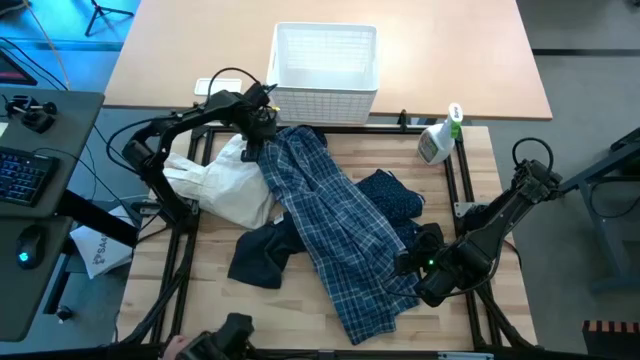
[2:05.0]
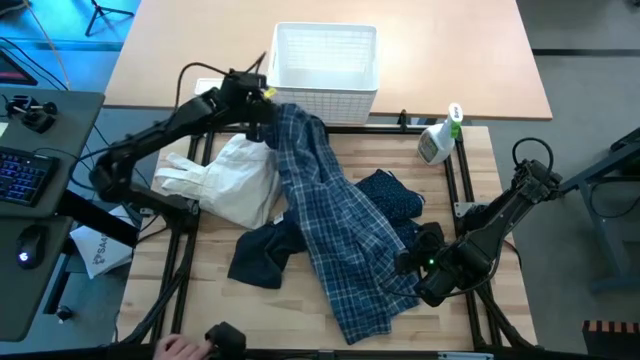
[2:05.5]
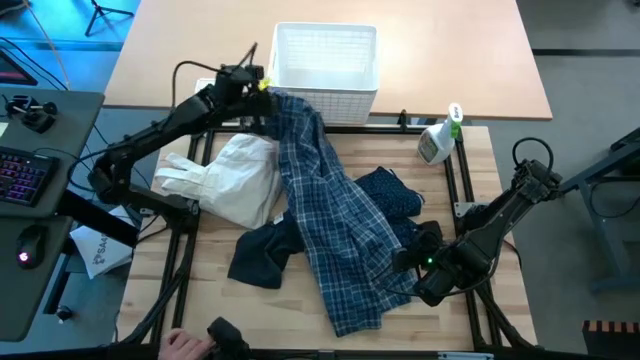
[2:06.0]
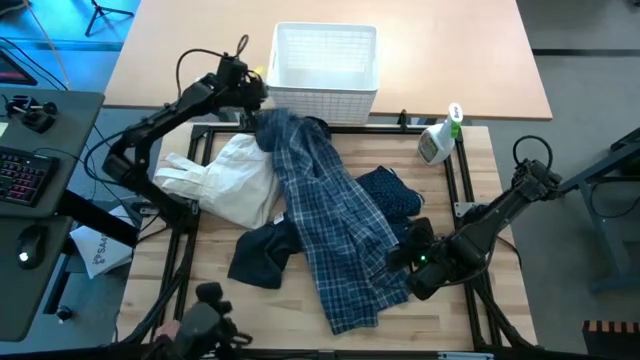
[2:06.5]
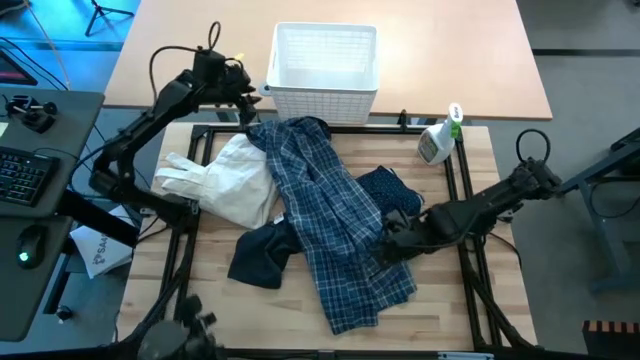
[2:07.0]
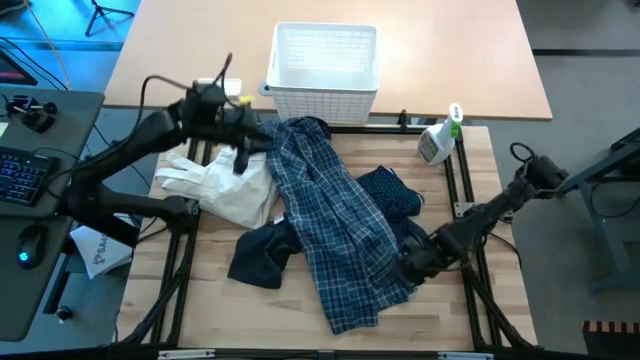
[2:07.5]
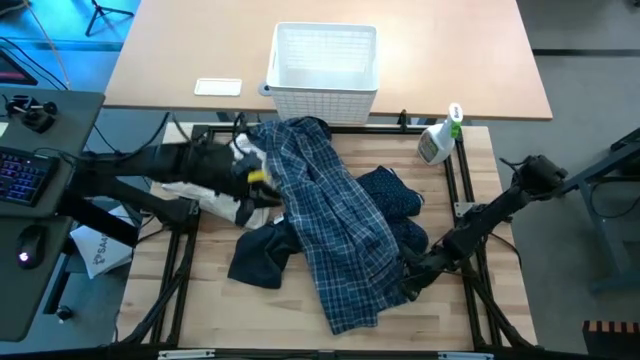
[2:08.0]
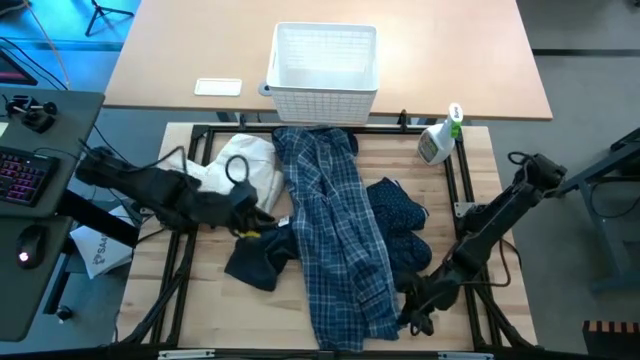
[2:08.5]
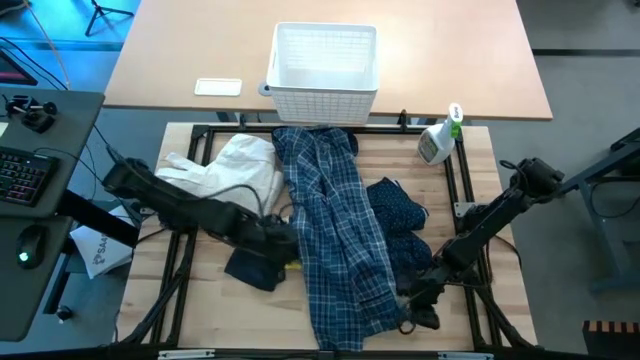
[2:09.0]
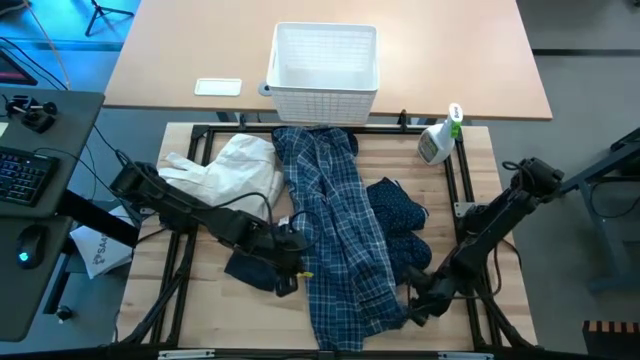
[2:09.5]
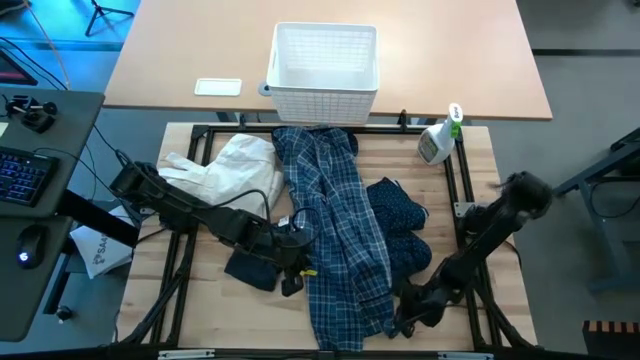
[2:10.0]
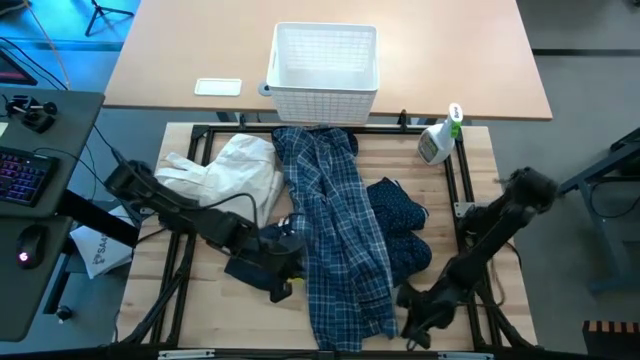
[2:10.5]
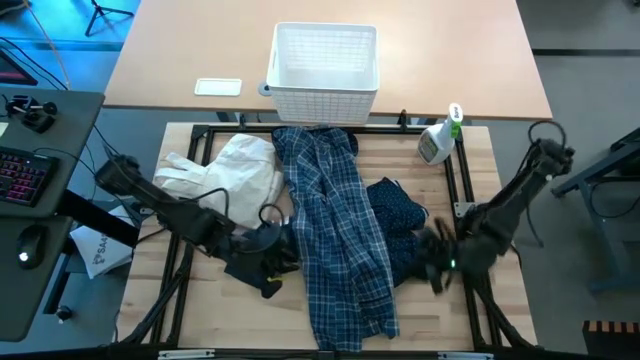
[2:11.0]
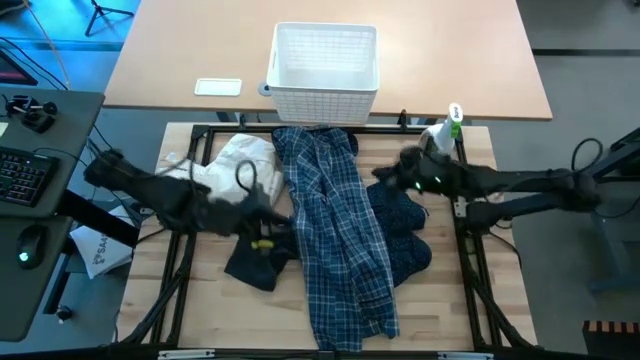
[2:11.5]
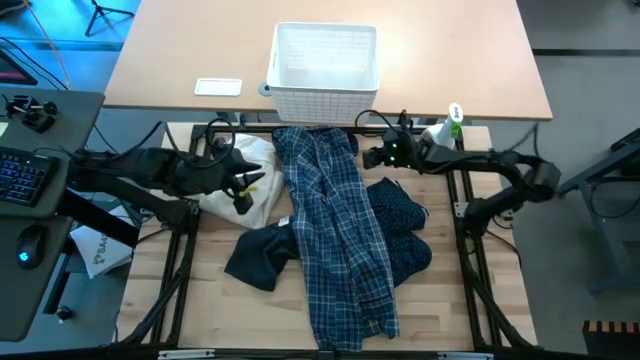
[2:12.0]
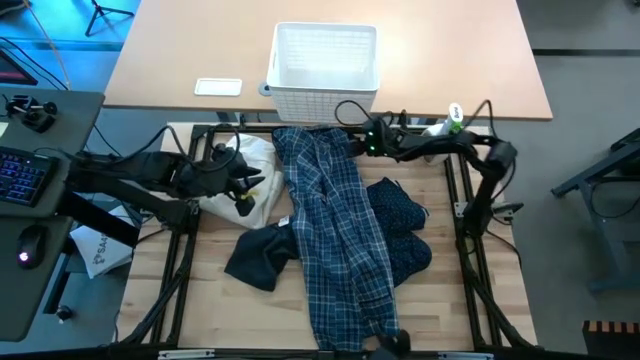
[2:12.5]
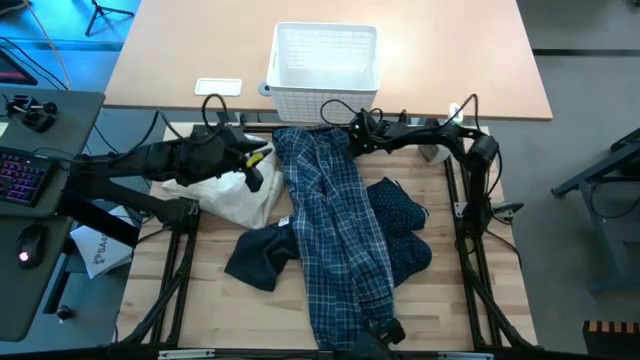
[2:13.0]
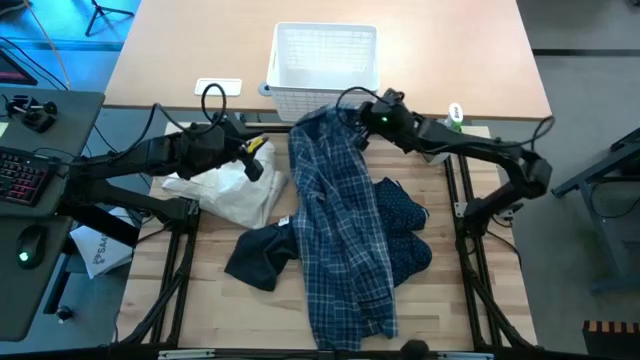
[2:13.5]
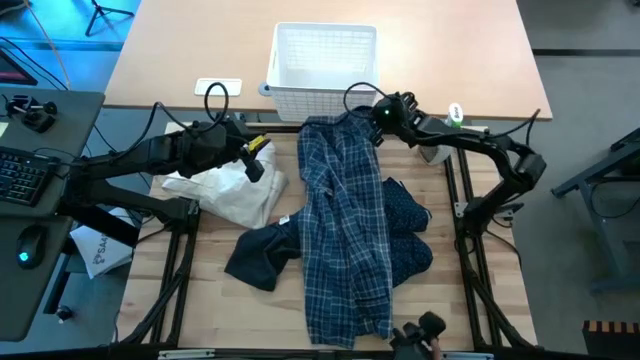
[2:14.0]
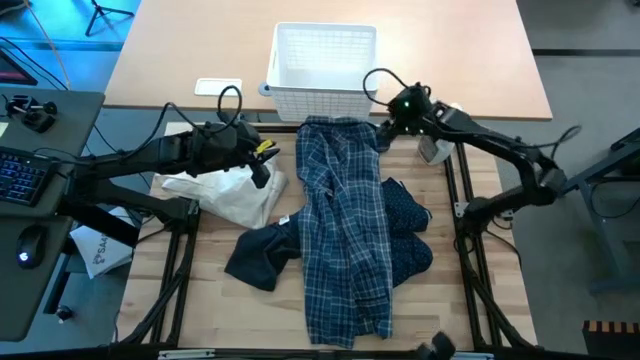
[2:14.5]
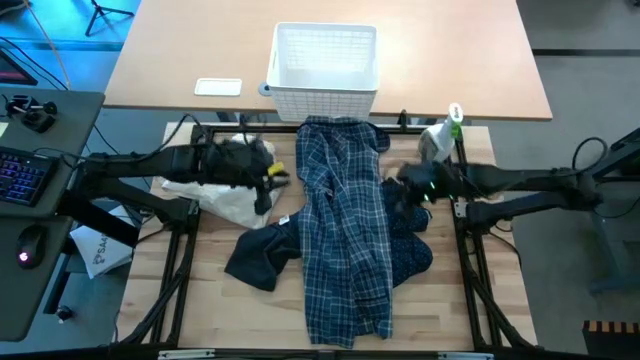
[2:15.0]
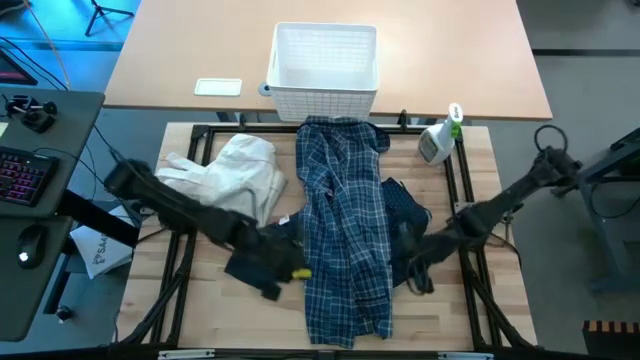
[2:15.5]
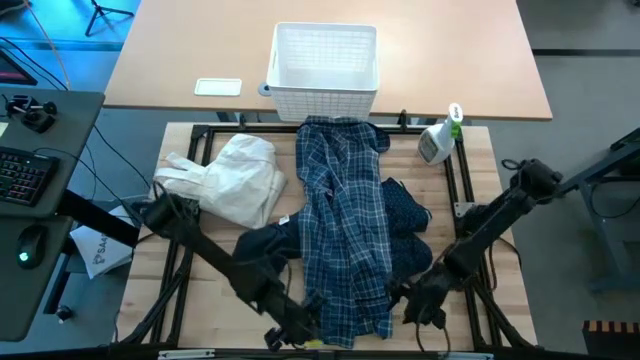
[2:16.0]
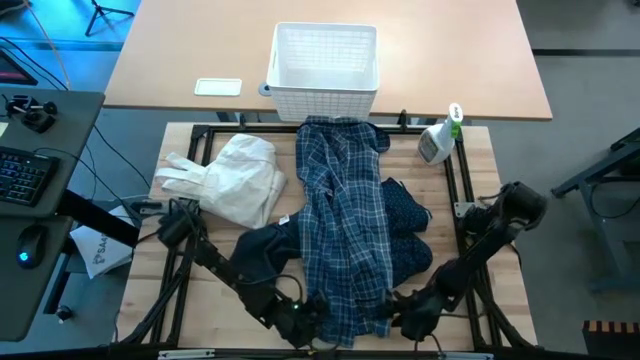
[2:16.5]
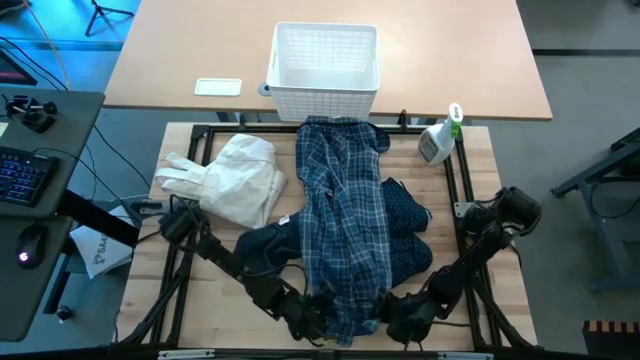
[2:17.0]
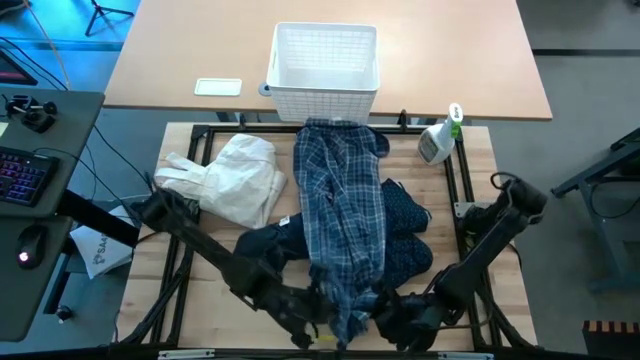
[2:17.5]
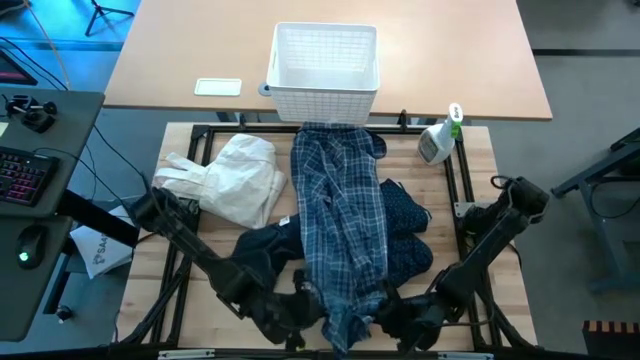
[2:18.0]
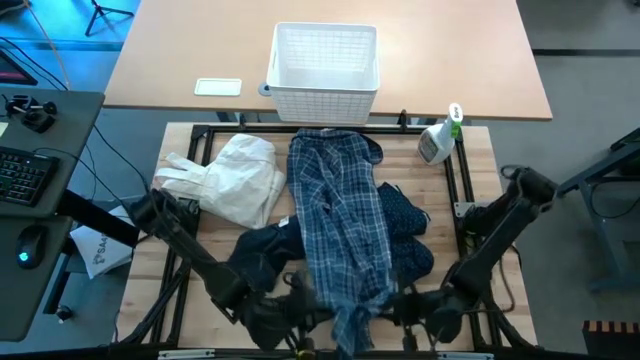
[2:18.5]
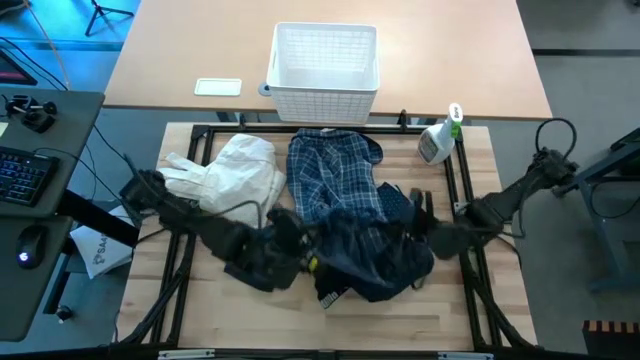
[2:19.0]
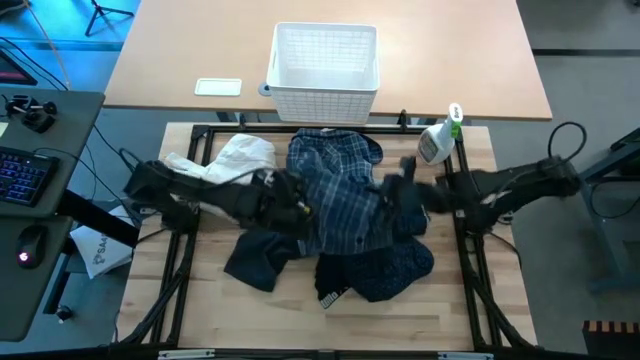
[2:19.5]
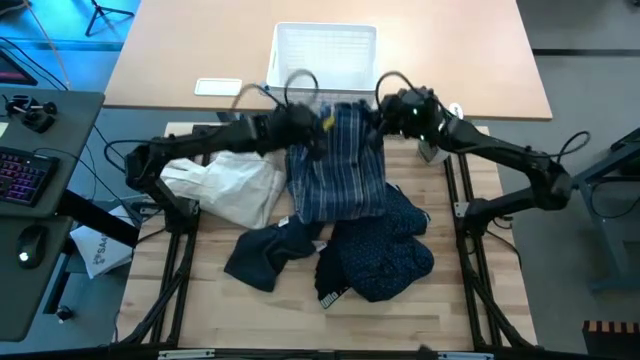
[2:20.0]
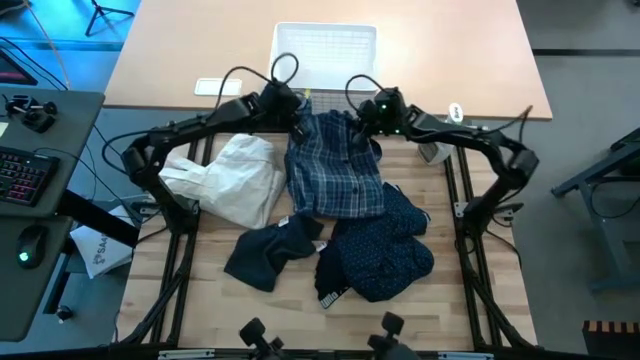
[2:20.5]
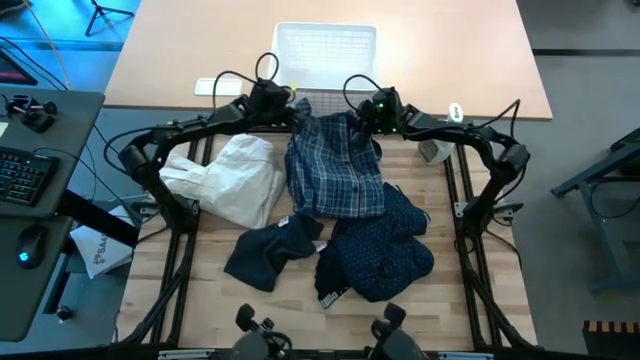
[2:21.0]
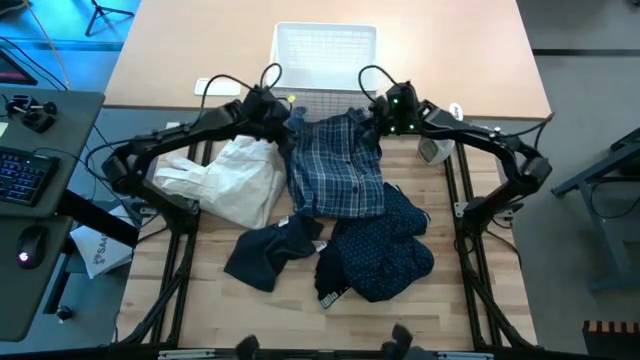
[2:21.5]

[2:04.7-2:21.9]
Task: Fold laundry
Fold the blue plaid flannel shirt

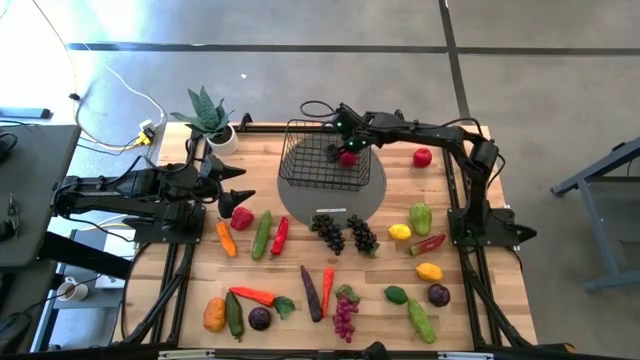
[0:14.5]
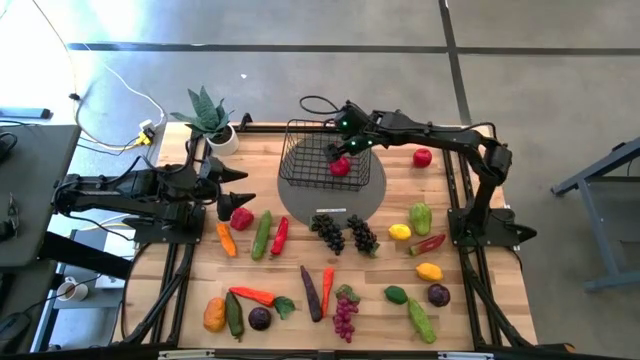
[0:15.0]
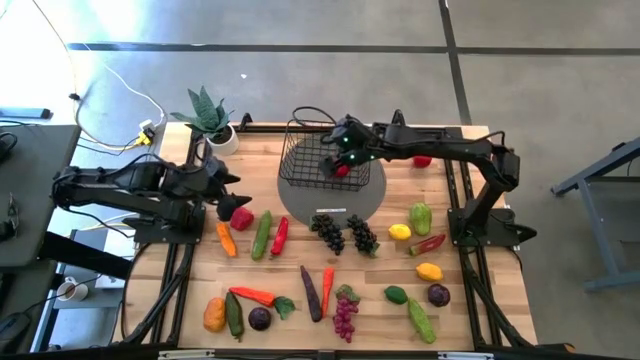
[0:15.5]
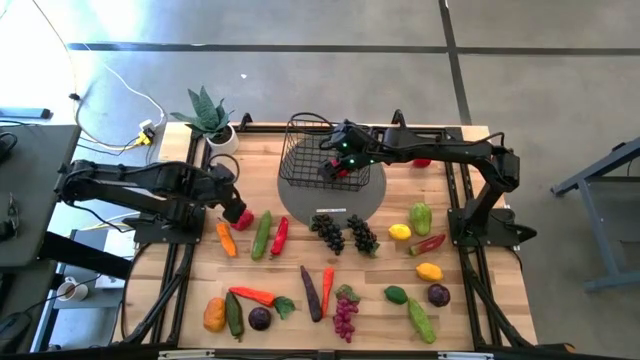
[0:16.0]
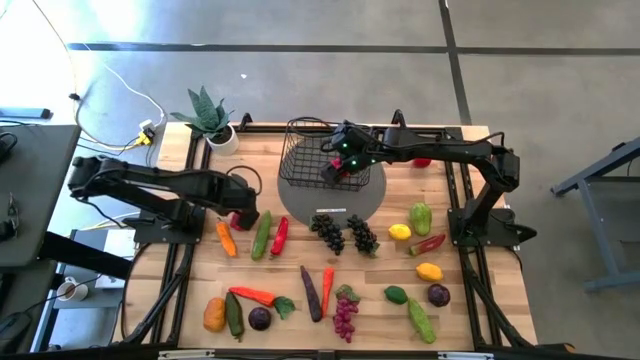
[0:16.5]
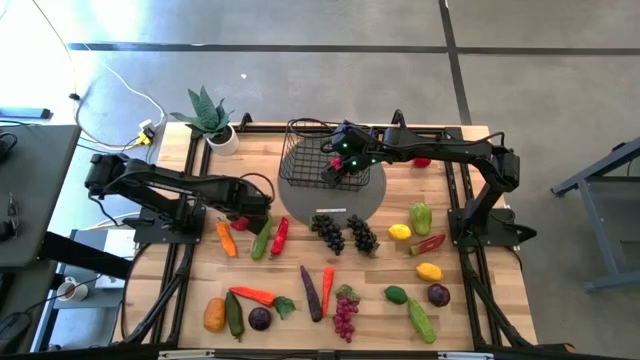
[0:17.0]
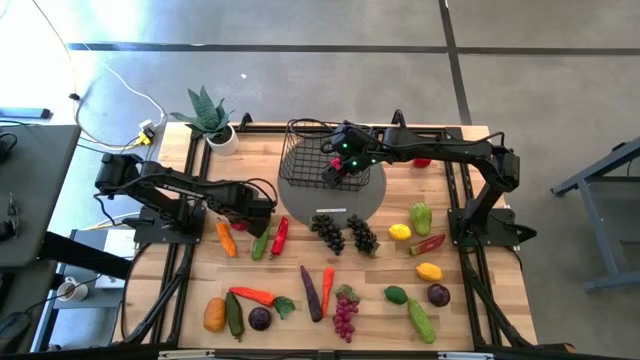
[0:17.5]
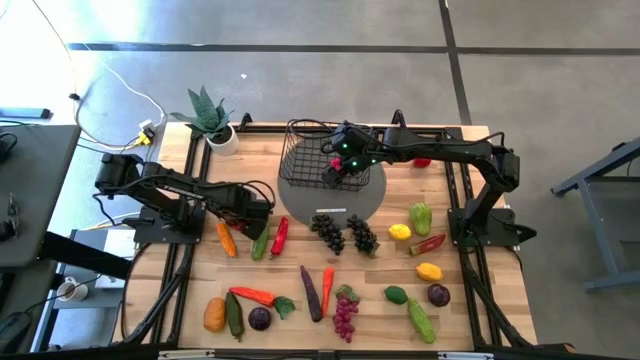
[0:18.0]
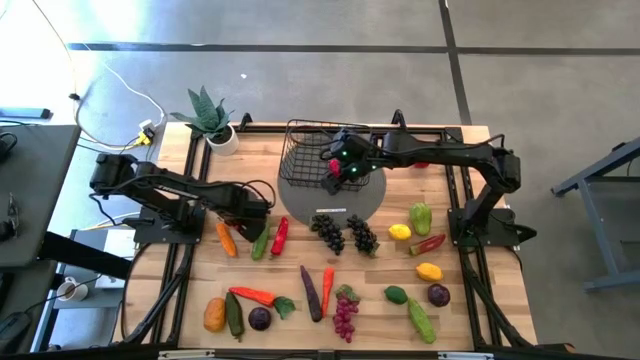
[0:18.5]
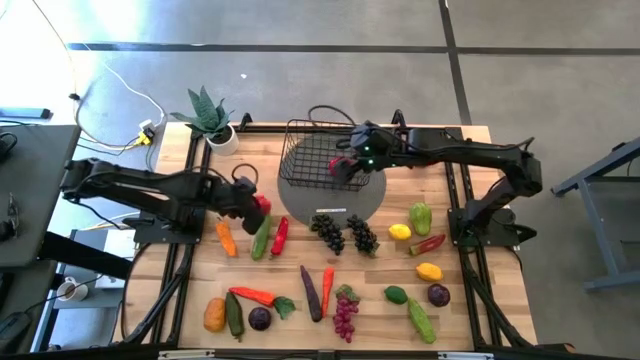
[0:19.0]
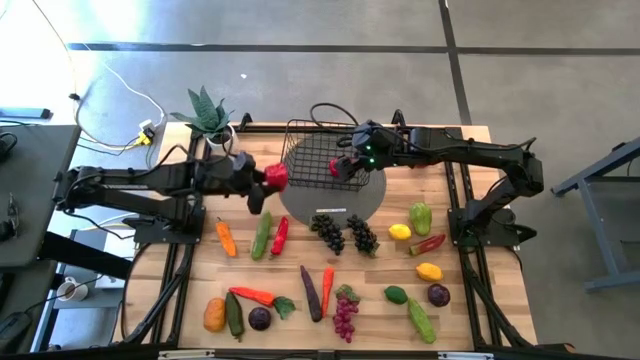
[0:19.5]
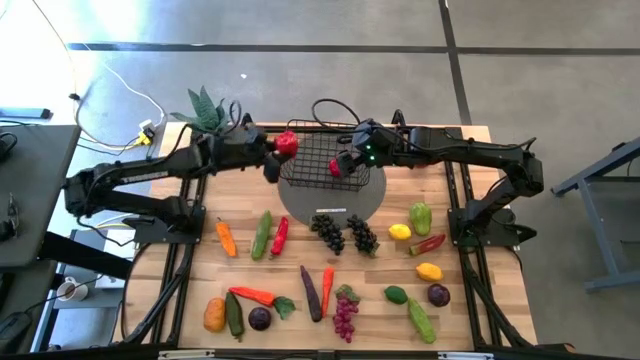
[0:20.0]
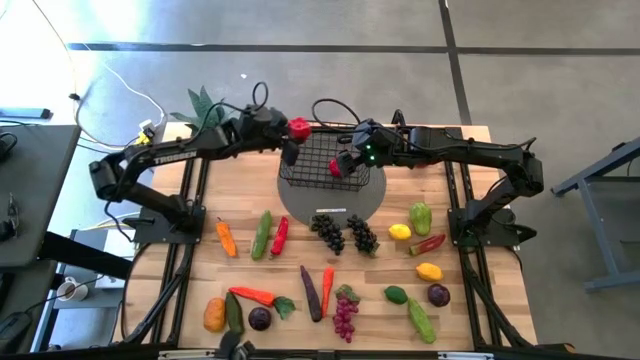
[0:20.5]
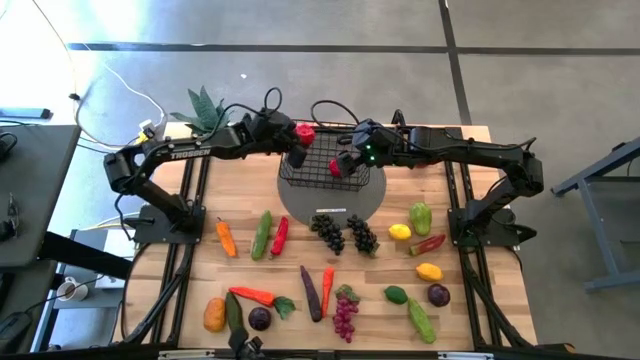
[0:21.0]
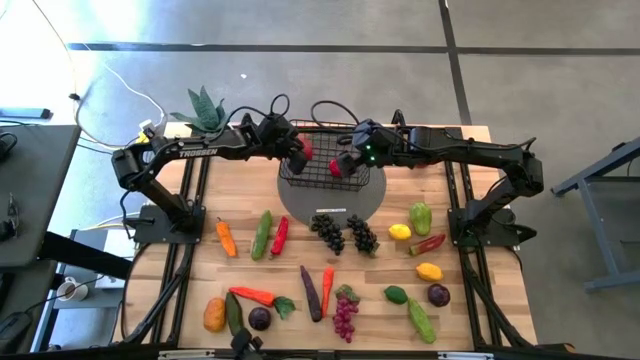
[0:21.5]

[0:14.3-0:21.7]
Task: Build produce basket
Put the green bell pepper into the wire basket
